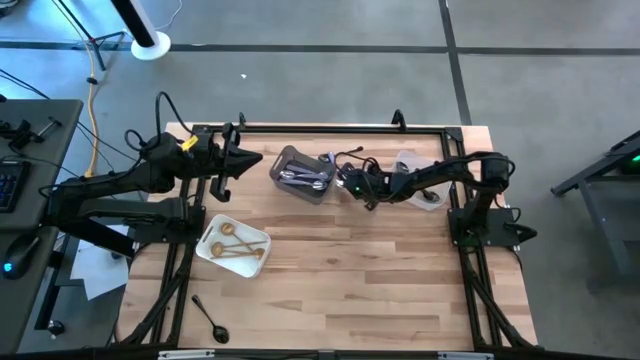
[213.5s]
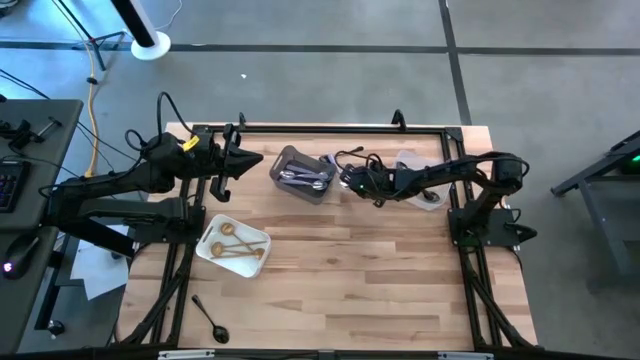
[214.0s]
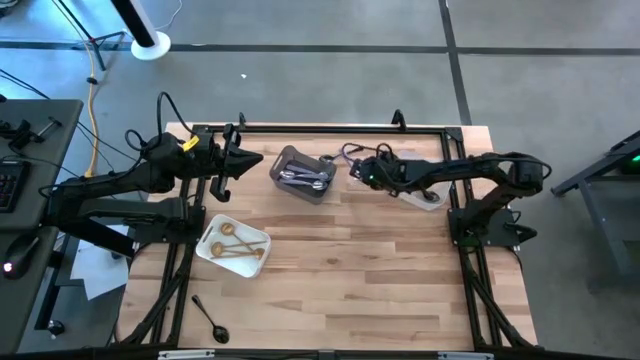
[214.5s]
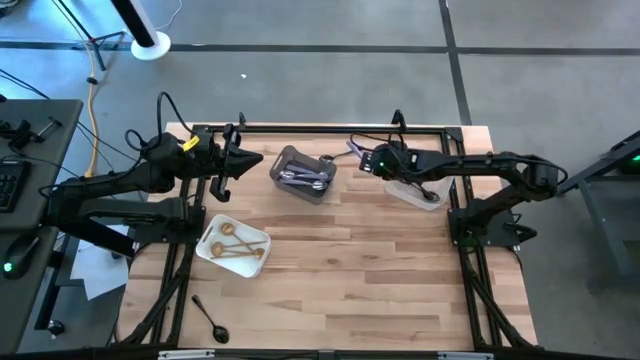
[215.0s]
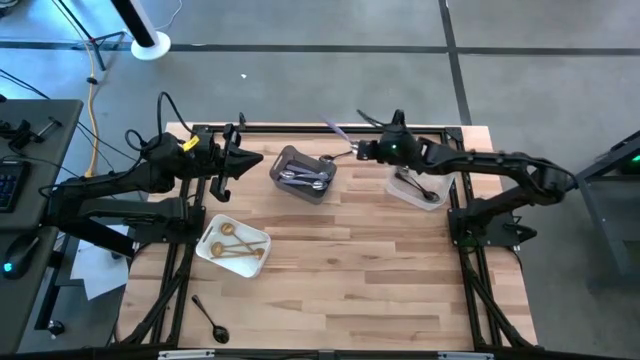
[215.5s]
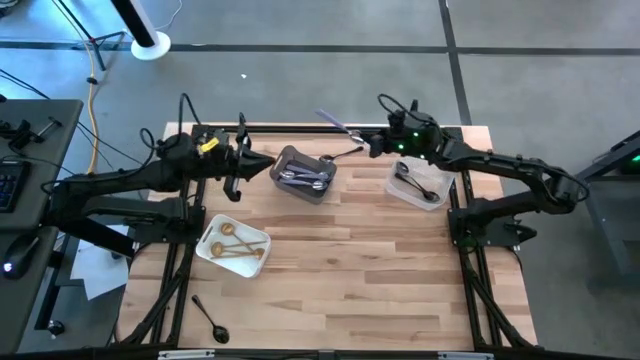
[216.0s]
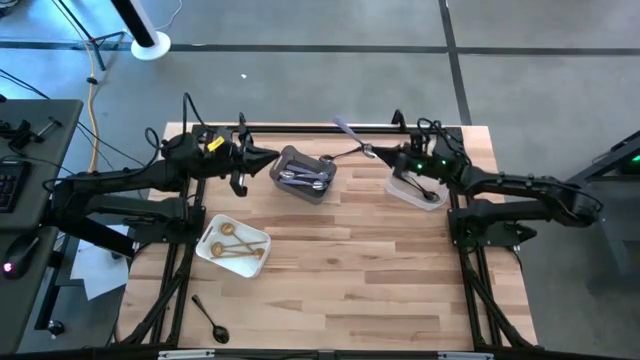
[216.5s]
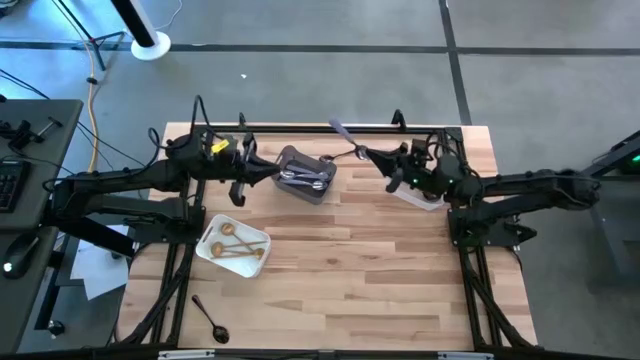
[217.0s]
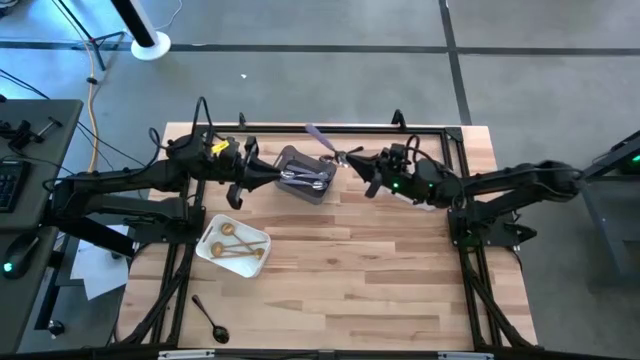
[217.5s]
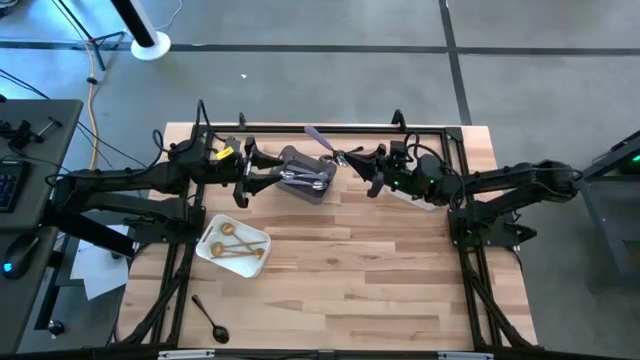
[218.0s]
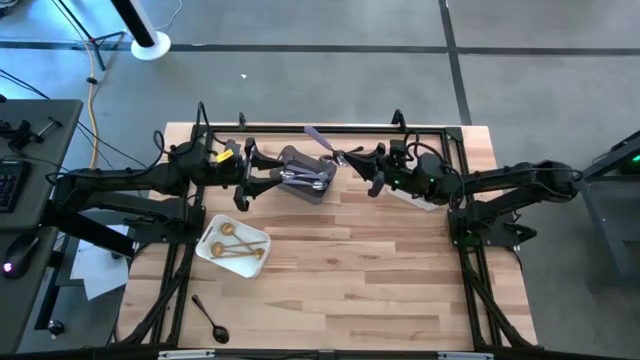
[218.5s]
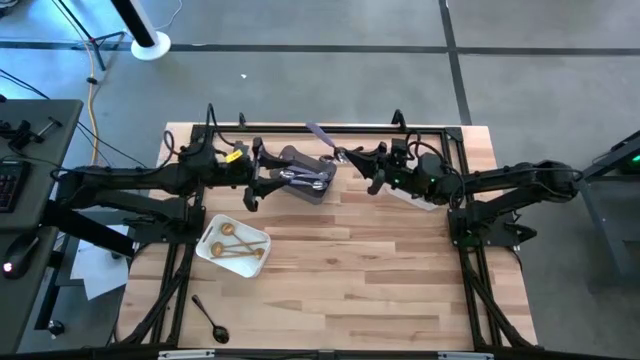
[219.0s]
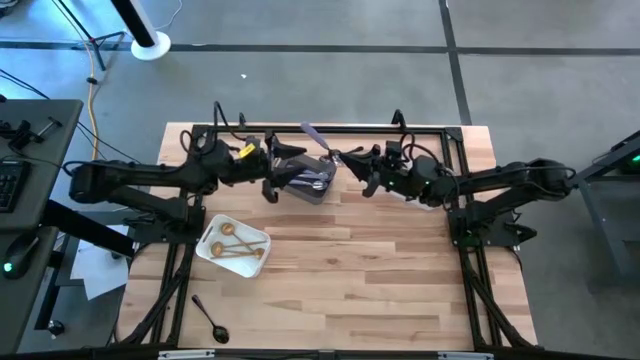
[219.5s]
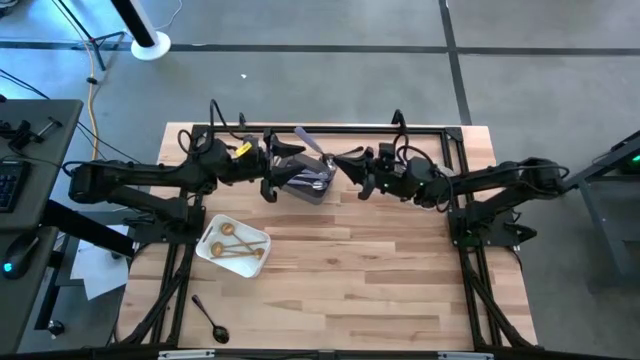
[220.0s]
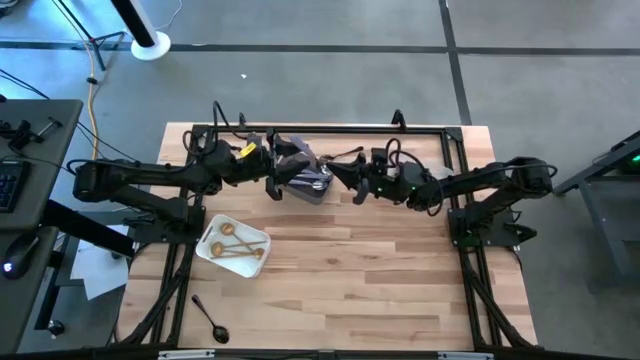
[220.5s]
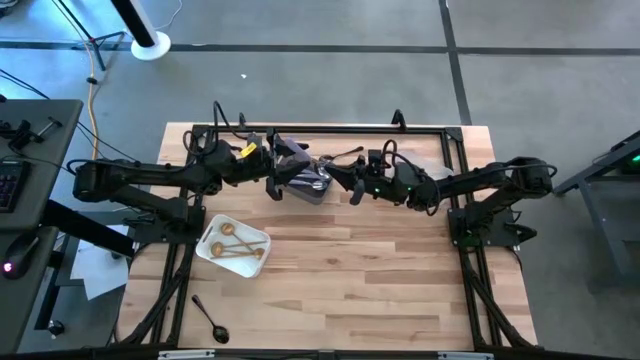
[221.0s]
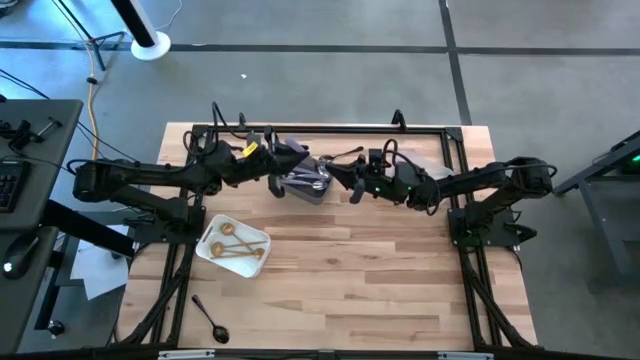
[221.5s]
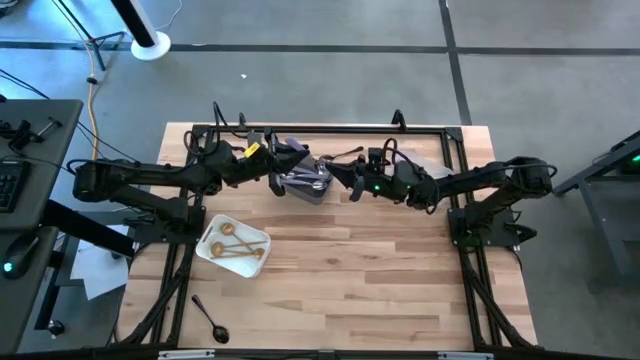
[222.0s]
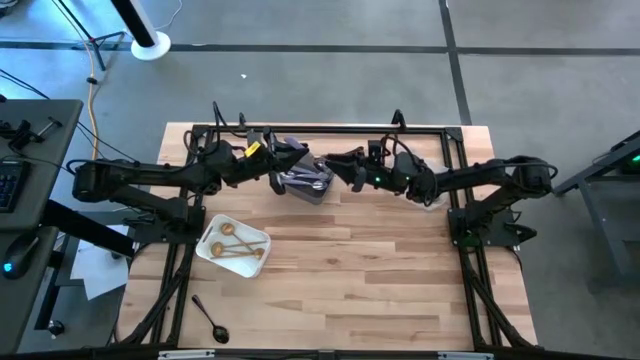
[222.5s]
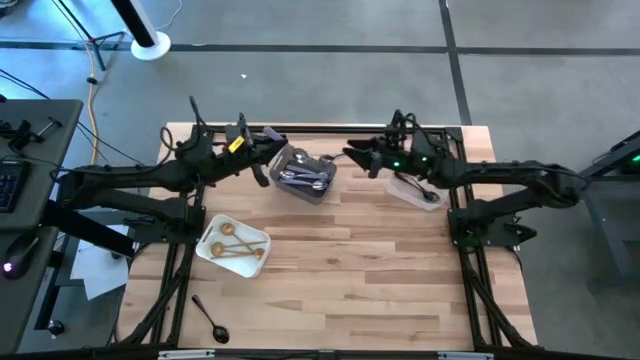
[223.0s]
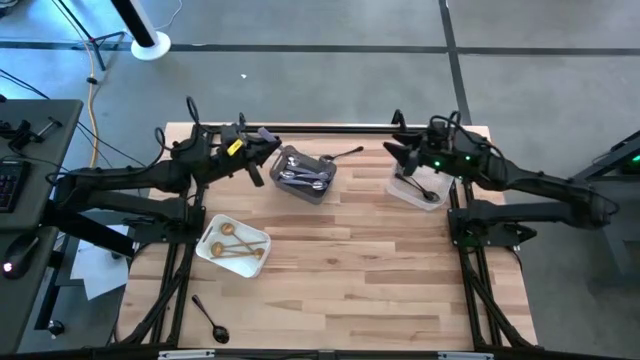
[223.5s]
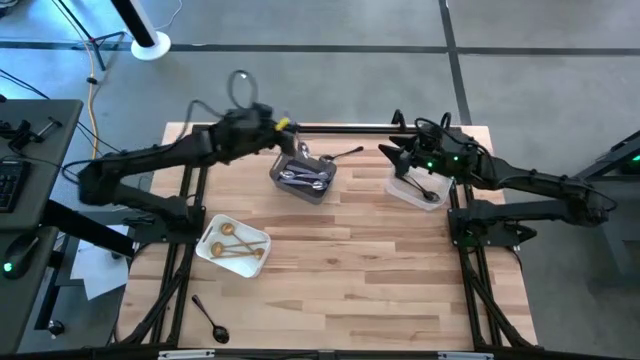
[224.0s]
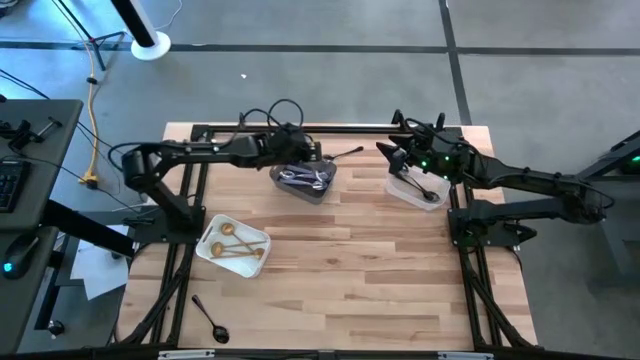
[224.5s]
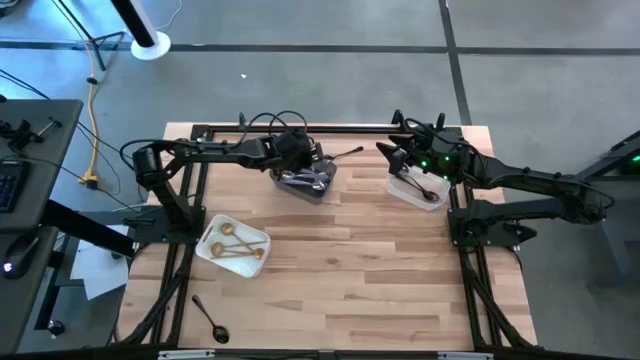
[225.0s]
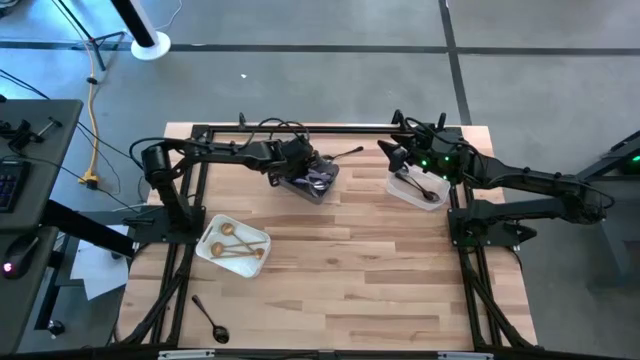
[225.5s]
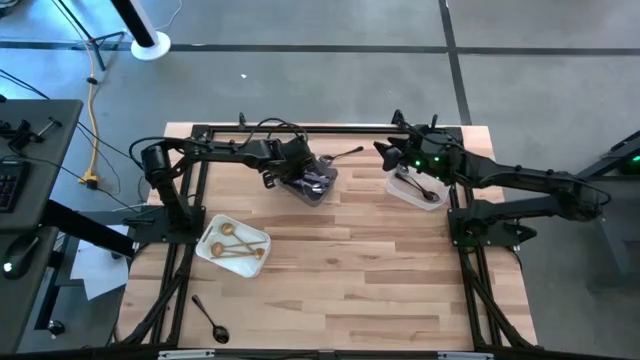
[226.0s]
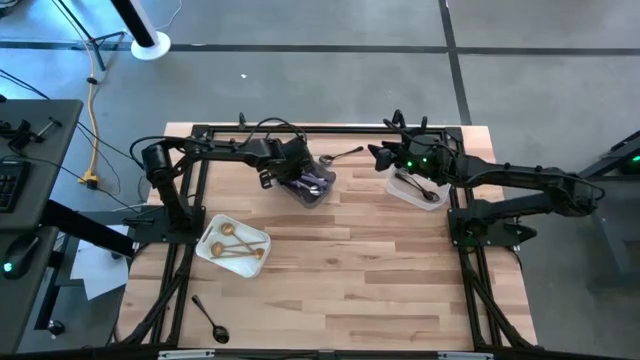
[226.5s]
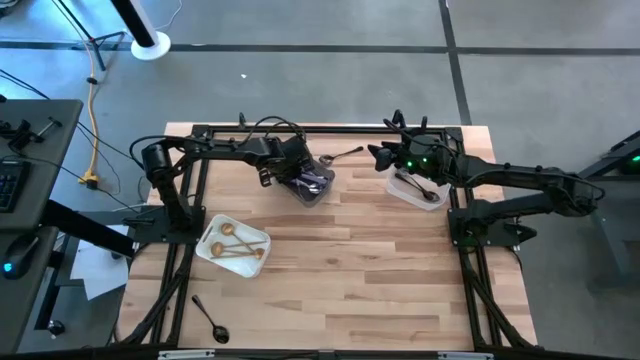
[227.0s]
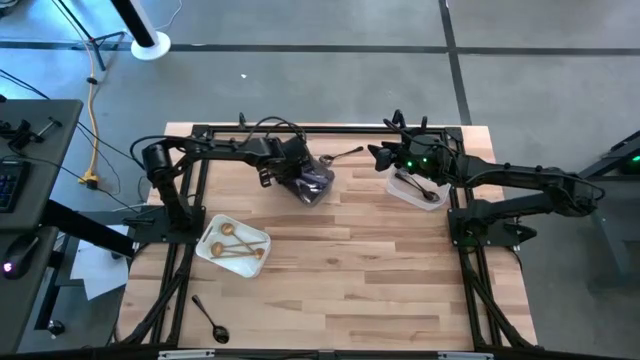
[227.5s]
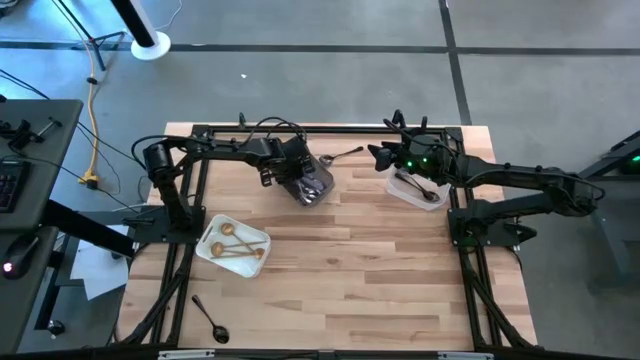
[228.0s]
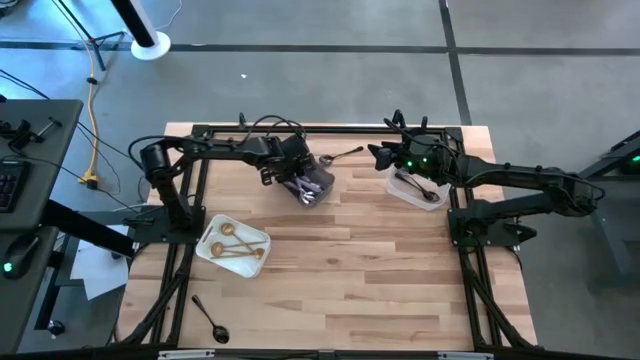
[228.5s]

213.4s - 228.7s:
Task: Sort silverware by color (type)
Put the purple spoon into the black bin

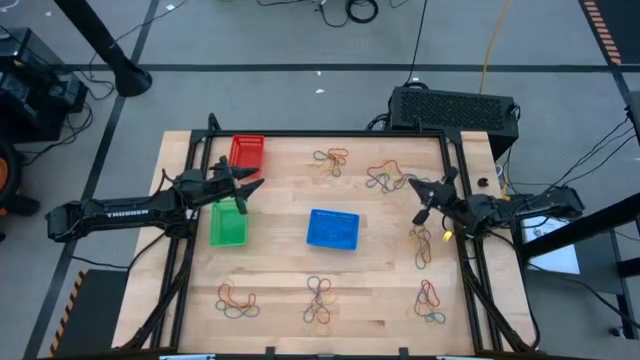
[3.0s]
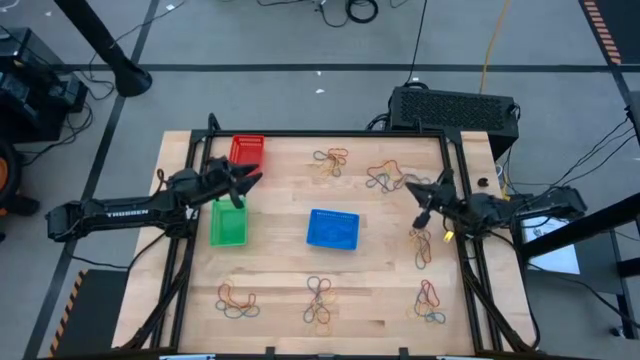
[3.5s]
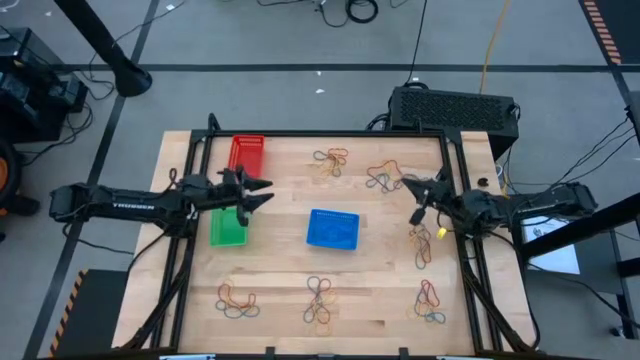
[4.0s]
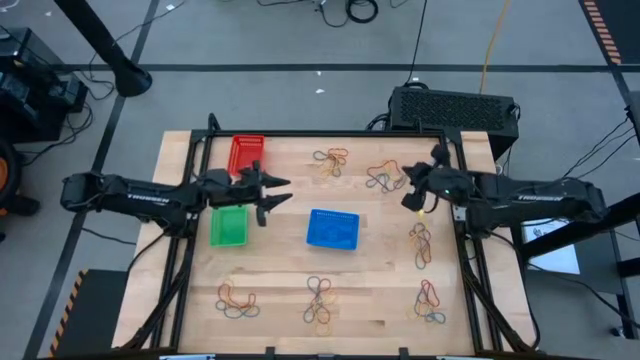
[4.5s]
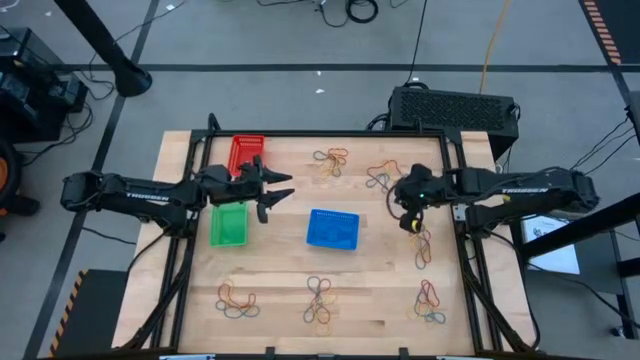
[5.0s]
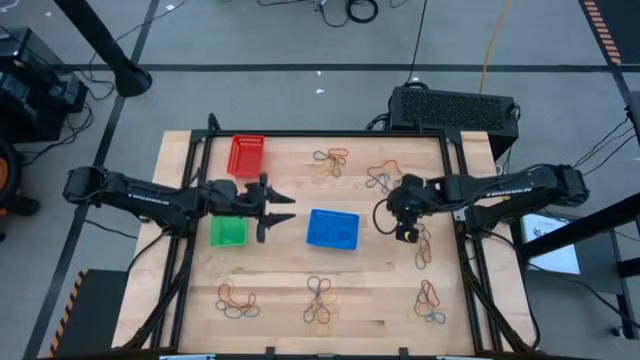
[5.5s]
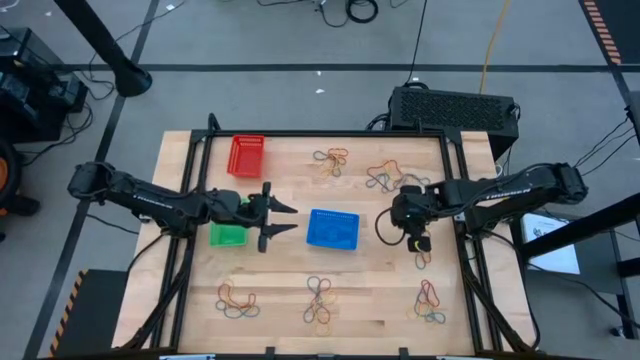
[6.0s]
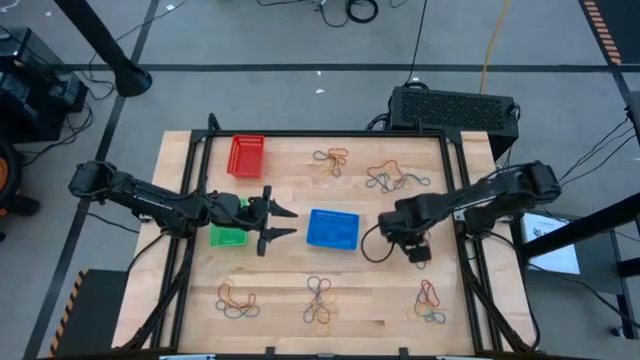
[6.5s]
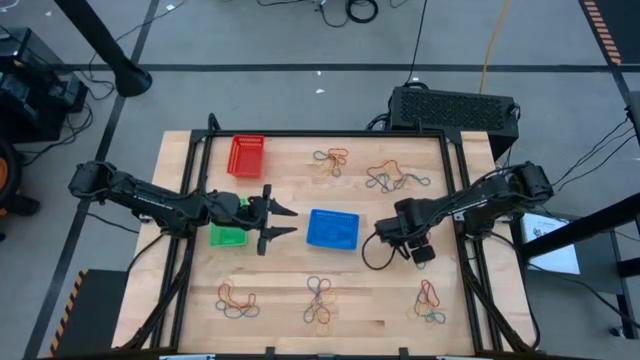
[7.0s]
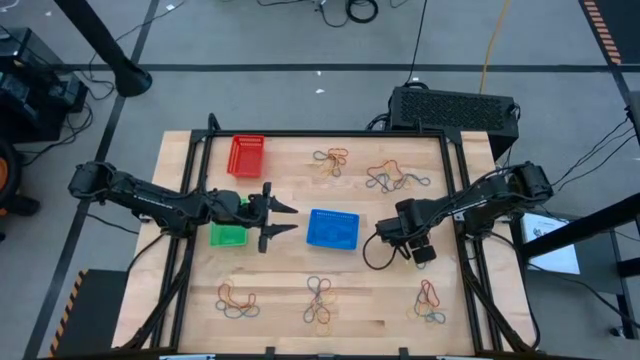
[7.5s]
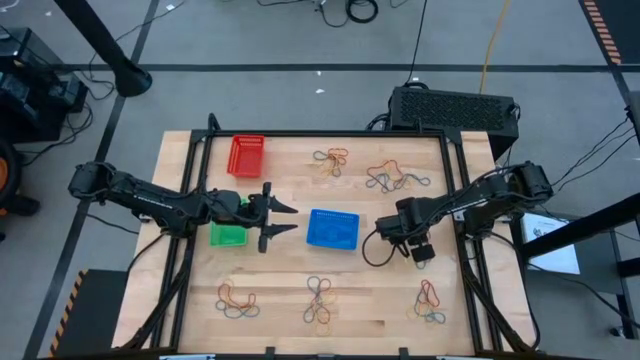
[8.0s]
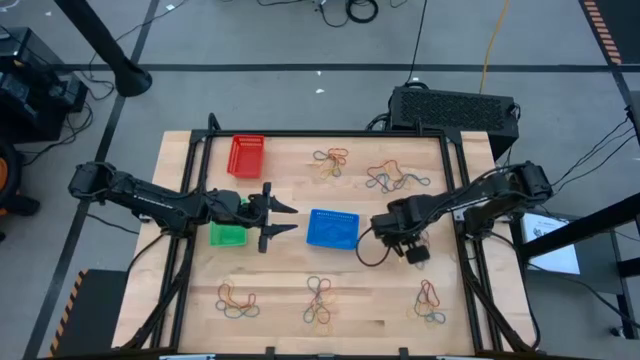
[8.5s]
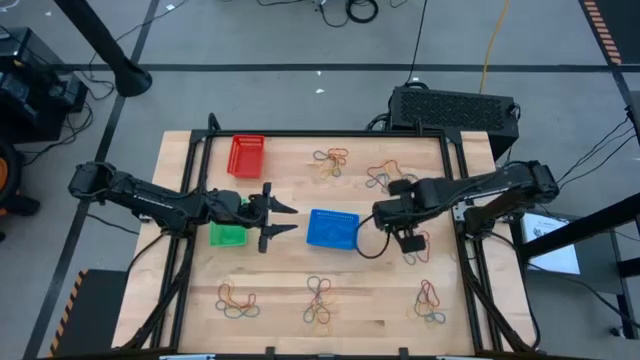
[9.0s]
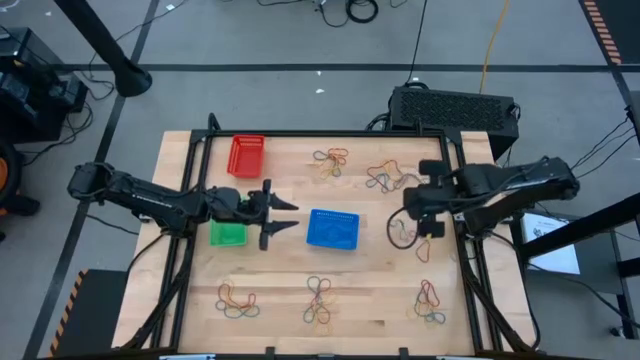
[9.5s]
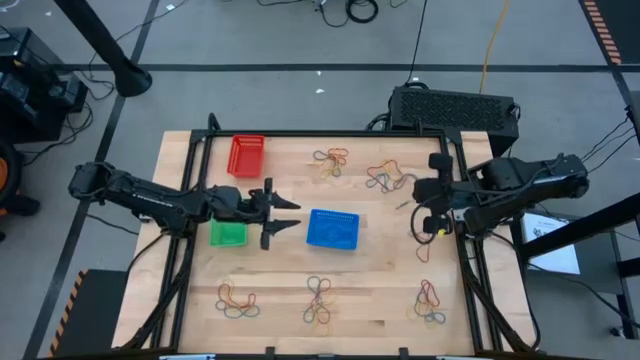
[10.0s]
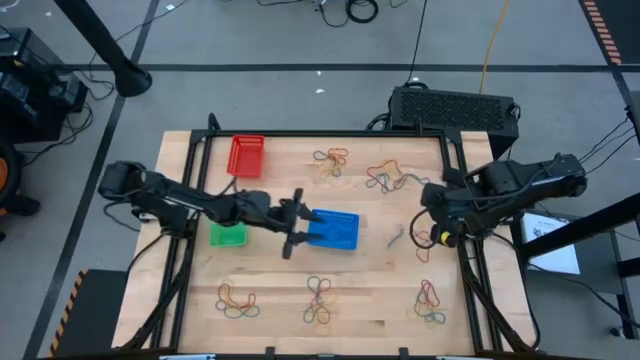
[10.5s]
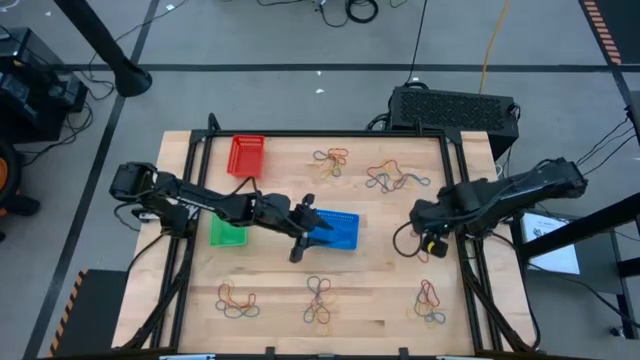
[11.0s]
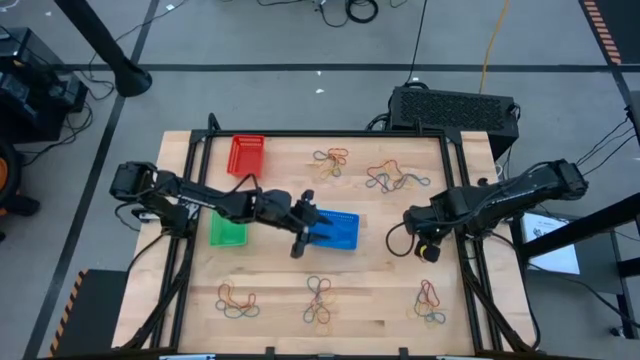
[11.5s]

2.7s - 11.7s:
Task: Sort rubber bands into baskets
Put the yellow rubber band into the red bin
